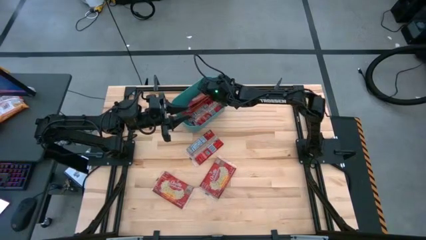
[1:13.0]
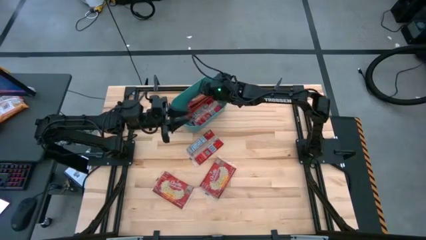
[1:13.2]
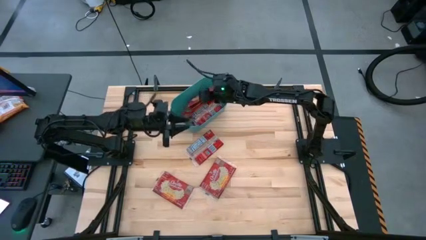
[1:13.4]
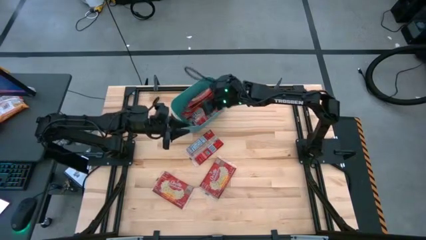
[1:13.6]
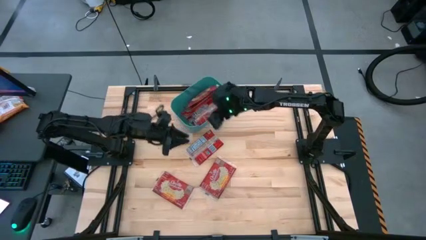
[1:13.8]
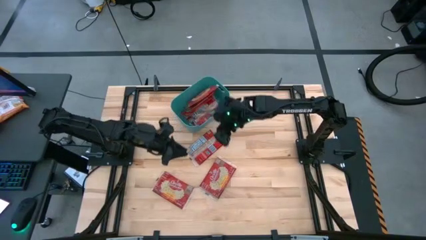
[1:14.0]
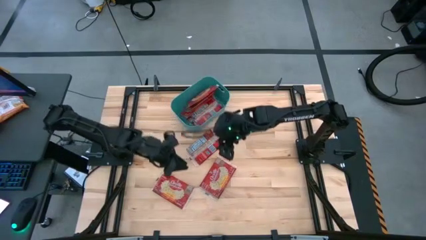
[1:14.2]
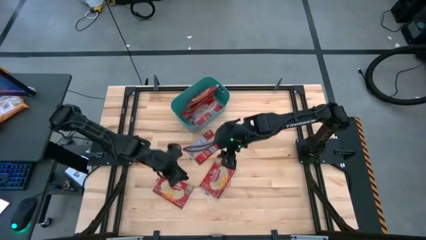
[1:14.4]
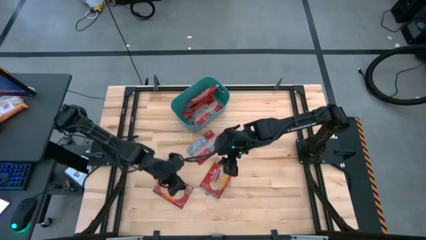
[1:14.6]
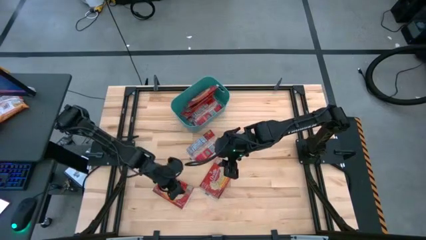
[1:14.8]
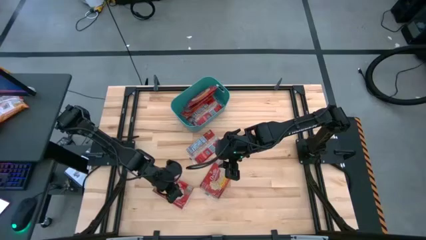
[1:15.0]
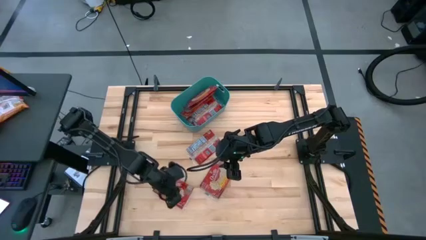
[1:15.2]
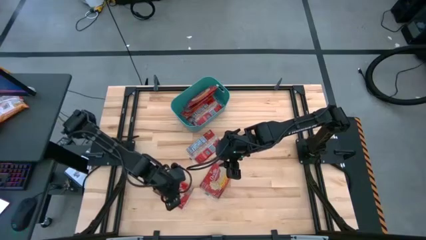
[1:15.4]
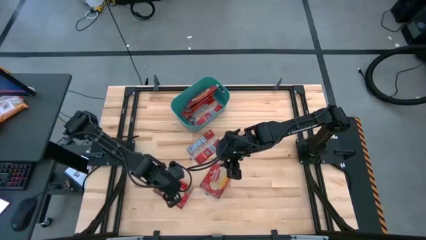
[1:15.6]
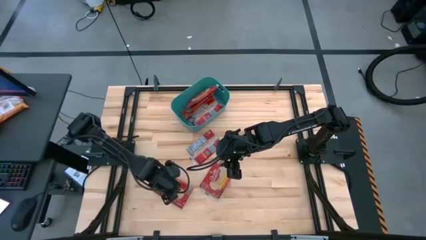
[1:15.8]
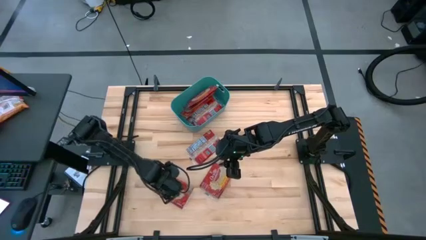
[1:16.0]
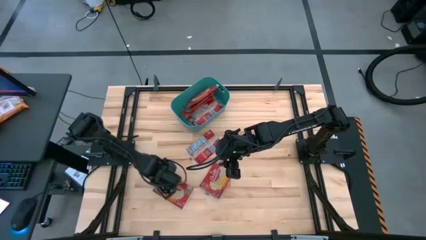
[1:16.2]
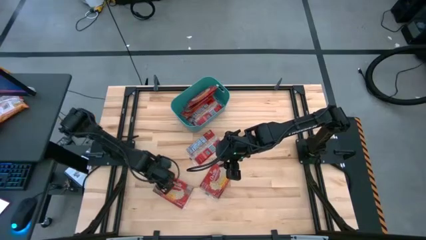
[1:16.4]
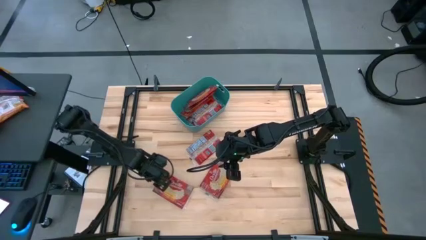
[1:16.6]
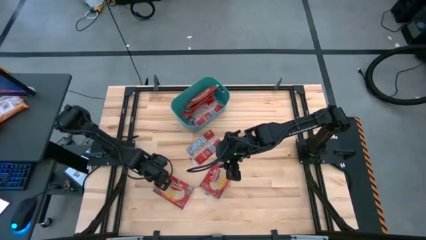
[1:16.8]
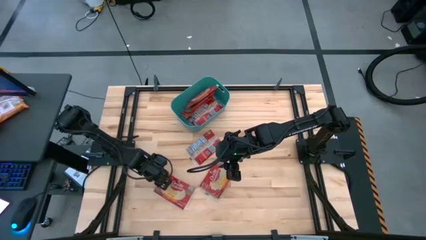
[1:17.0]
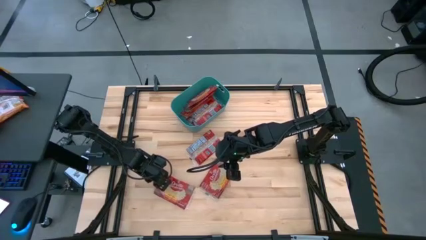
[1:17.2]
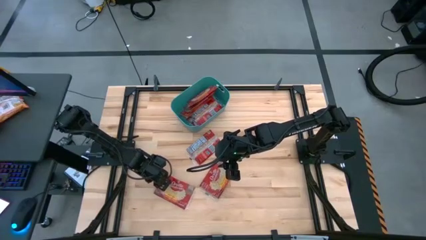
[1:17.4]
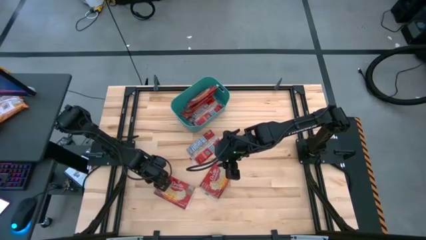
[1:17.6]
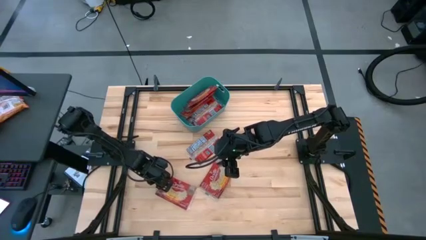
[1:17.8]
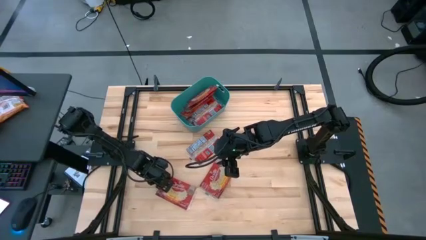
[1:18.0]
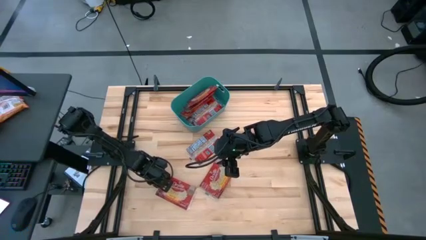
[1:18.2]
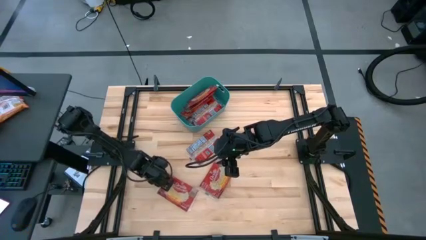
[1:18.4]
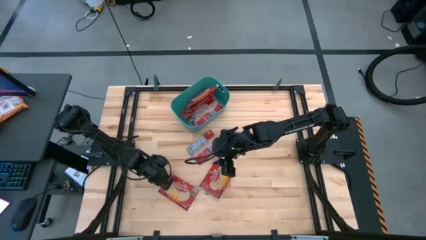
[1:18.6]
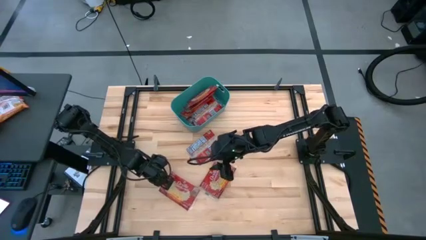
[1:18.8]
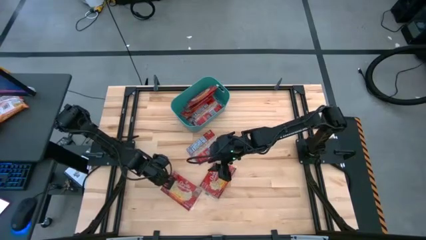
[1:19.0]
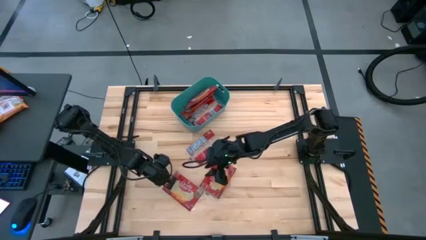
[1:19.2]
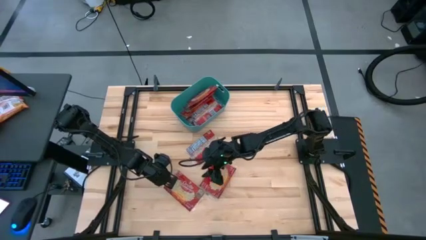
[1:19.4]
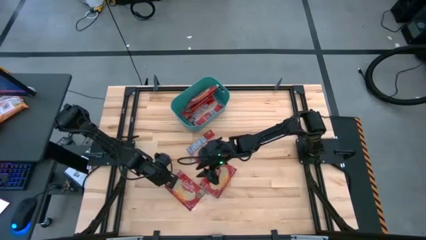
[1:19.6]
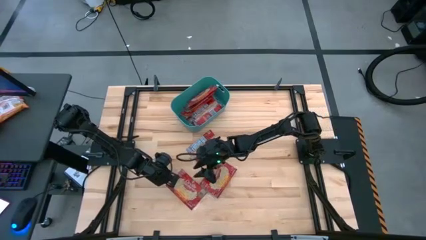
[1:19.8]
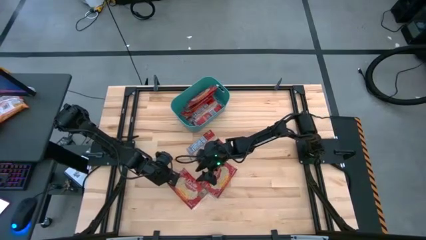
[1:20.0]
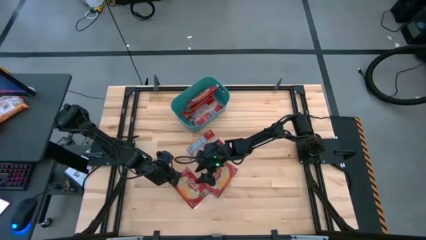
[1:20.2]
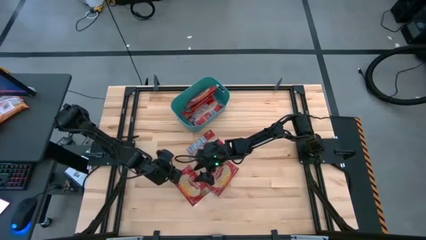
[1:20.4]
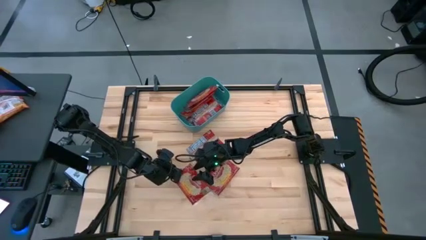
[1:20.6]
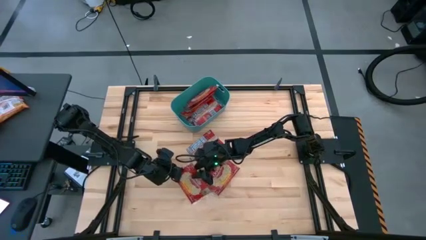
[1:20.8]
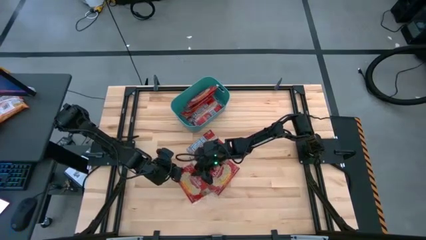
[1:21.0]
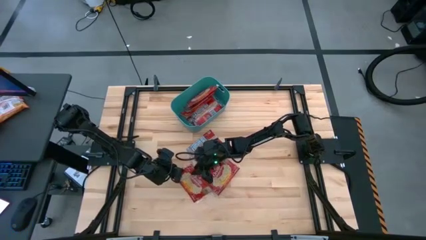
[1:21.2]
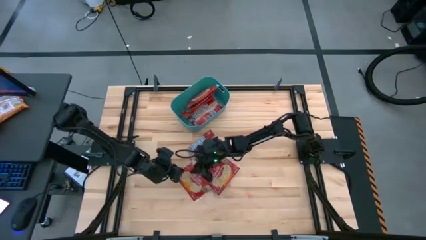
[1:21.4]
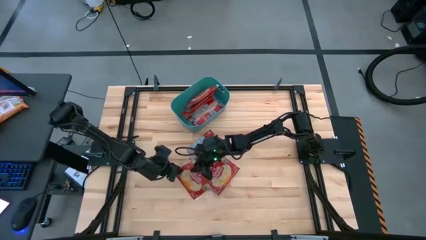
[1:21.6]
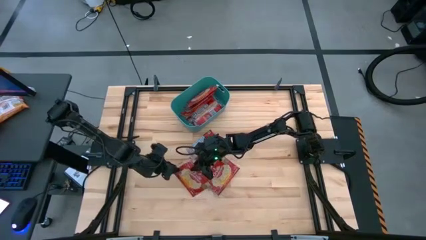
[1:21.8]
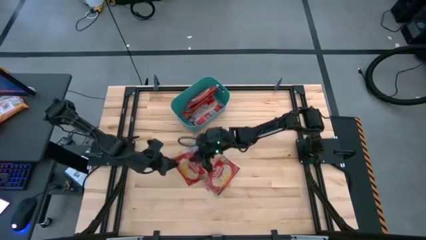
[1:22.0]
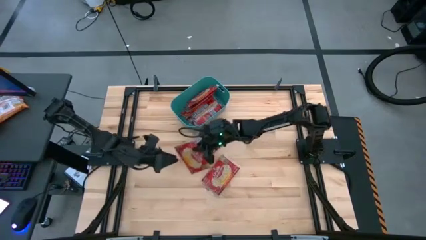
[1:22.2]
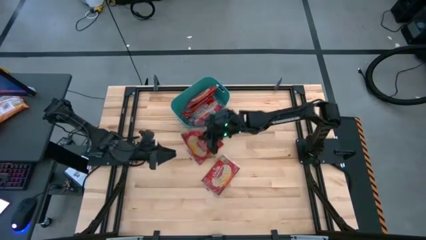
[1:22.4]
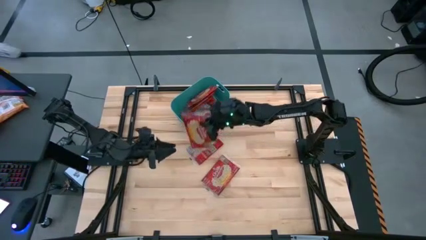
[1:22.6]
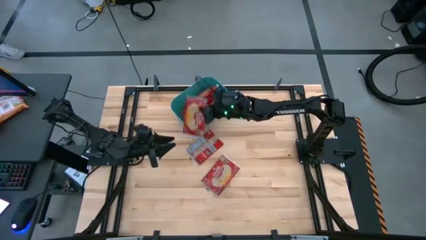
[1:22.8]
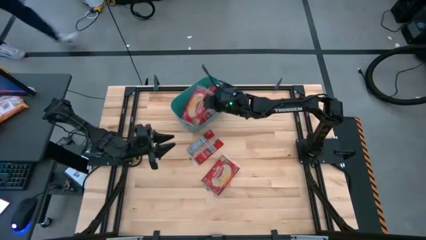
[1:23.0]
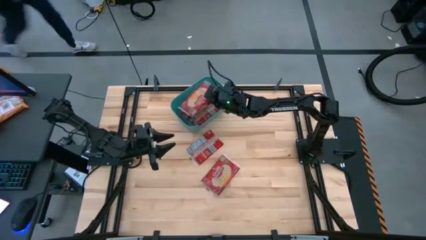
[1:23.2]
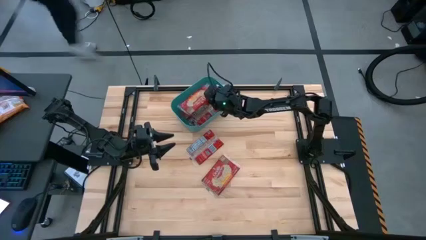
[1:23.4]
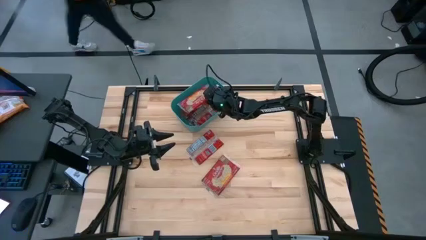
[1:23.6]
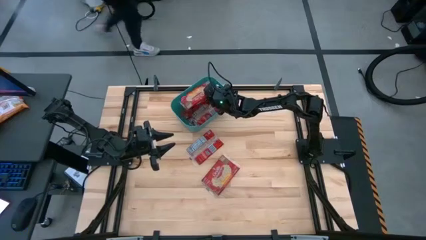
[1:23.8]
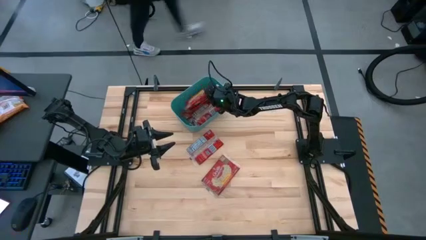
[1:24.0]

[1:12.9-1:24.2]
Task: Sort popcorn bags into baskets
Put the red popcorn bag into the blue bin

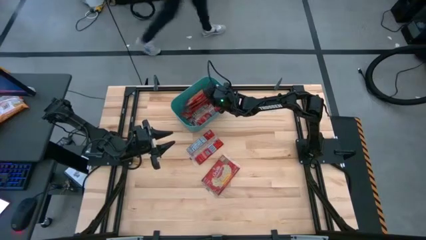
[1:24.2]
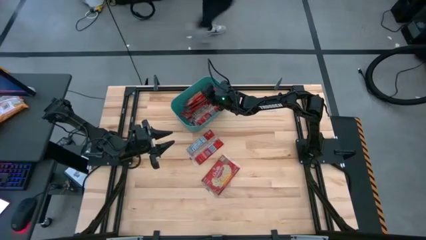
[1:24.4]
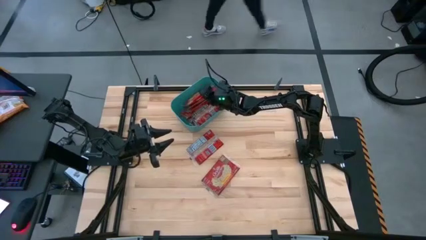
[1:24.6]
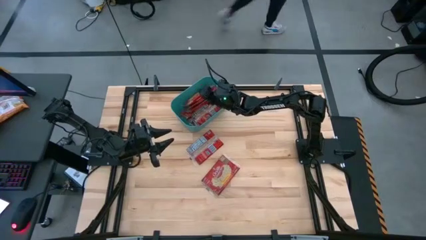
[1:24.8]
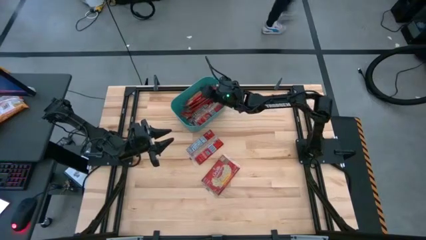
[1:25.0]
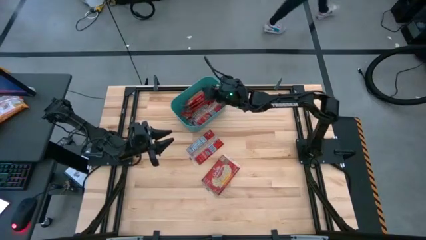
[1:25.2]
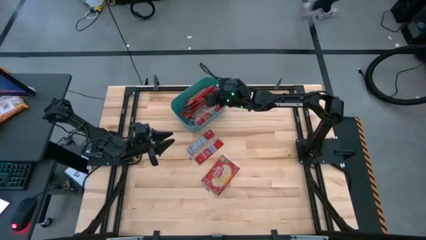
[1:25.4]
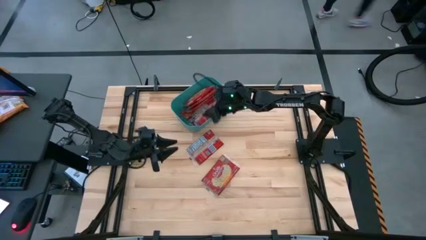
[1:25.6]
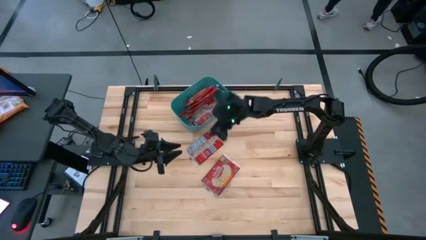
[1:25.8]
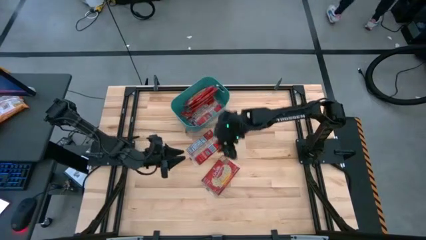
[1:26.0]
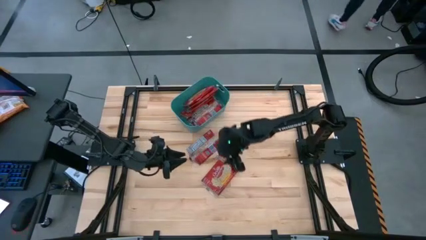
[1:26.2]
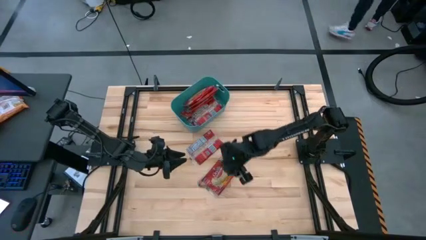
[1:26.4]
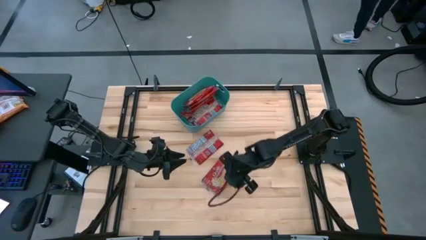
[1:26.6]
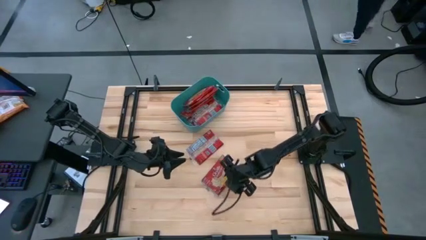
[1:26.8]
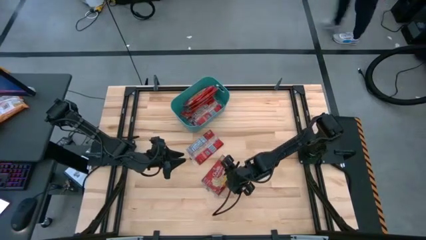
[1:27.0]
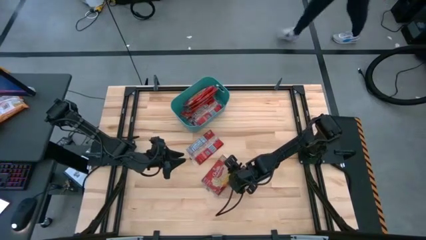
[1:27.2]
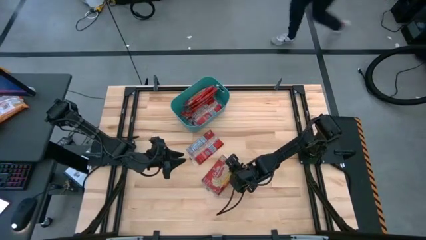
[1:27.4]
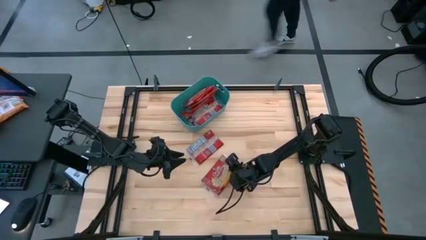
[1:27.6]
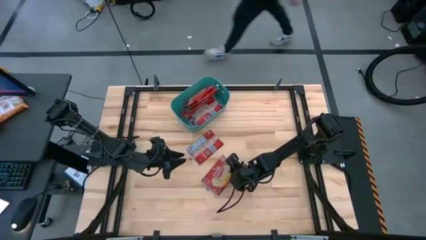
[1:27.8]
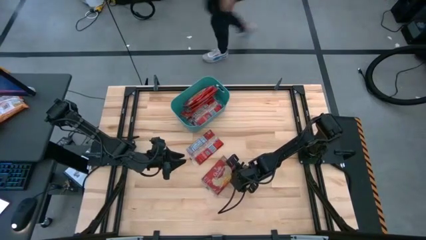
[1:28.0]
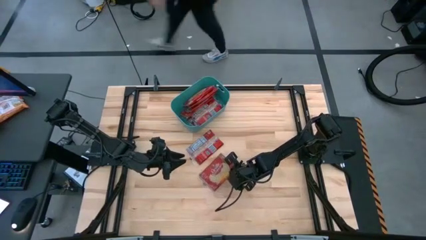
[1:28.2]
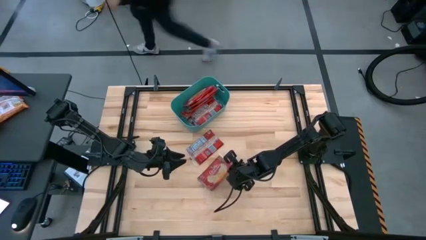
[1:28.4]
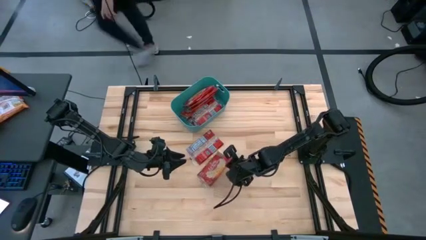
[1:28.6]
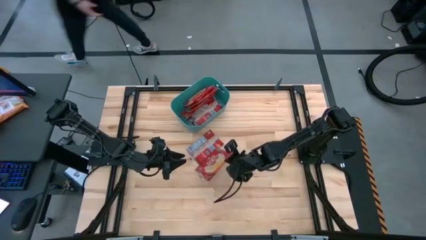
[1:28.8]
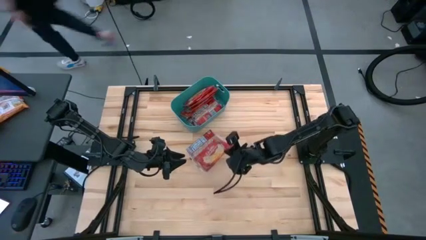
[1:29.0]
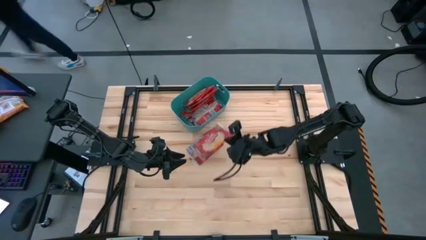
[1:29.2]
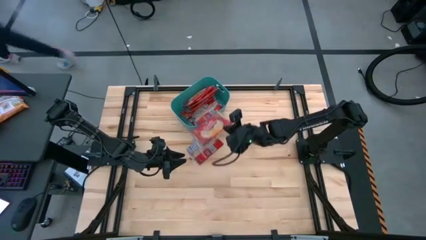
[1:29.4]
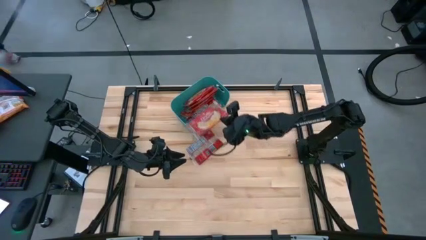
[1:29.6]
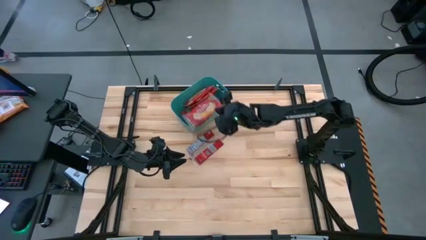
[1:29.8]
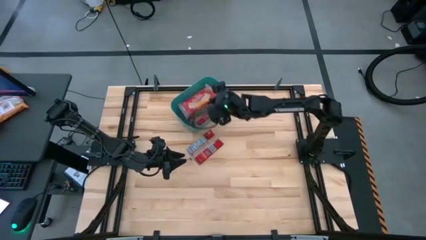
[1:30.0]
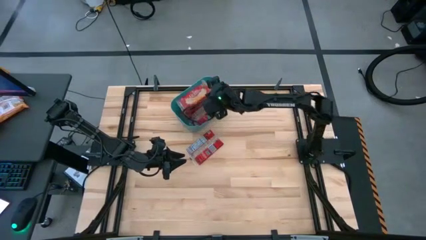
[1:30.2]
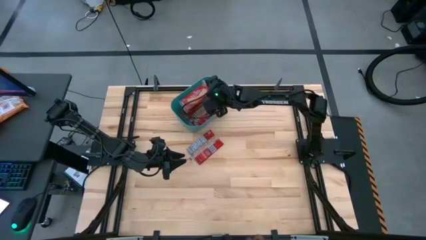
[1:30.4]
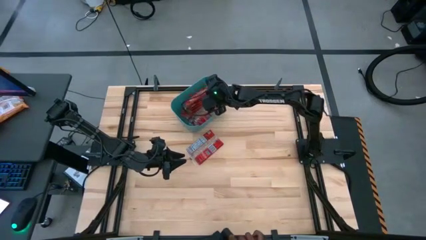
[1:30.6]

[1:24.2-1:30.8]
Put the red popcorn bag into the blue bin
